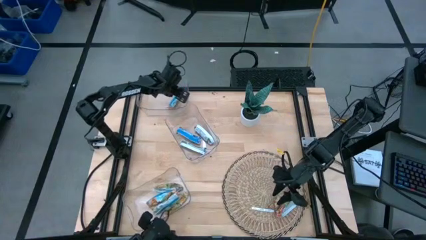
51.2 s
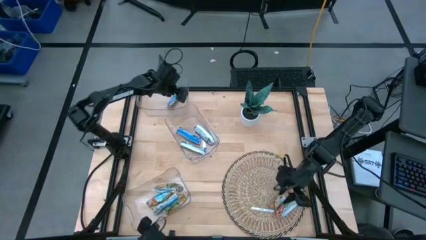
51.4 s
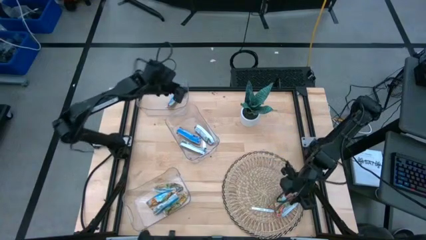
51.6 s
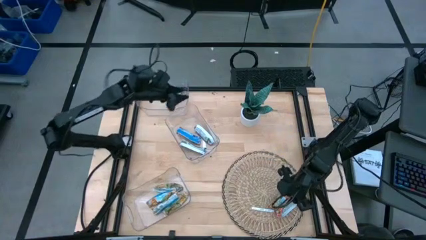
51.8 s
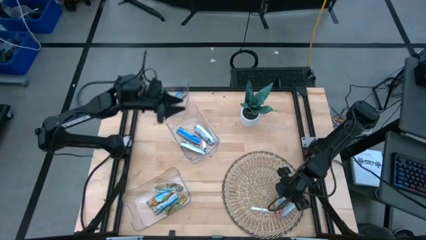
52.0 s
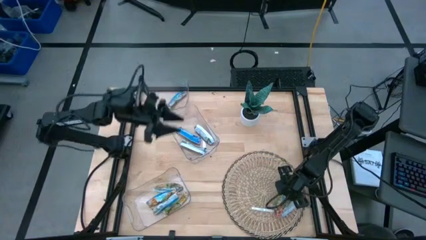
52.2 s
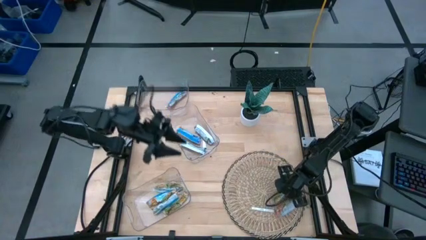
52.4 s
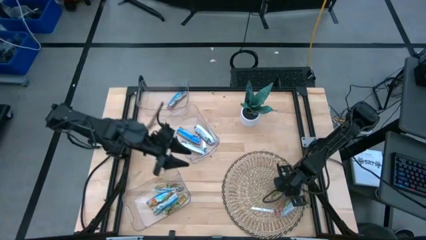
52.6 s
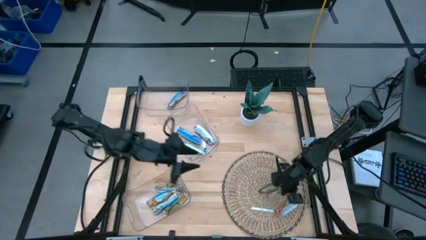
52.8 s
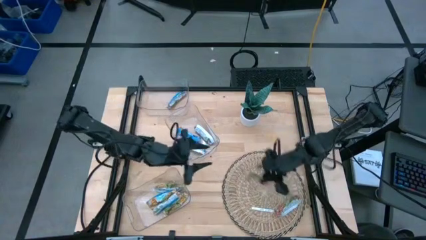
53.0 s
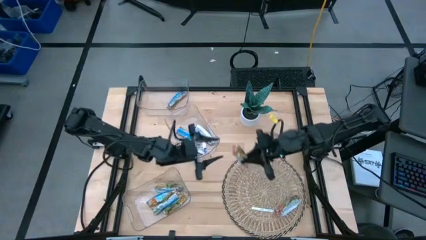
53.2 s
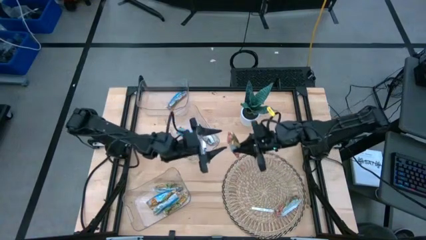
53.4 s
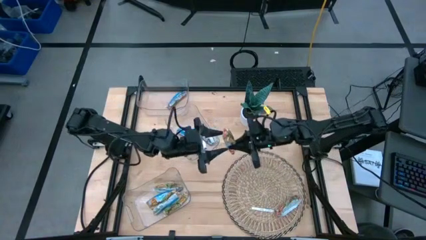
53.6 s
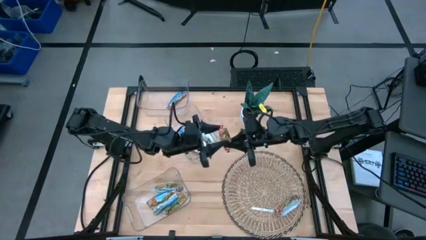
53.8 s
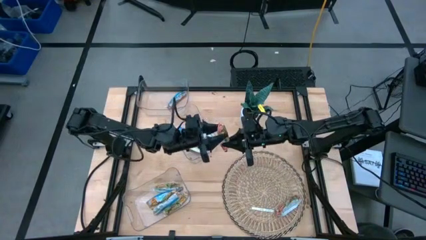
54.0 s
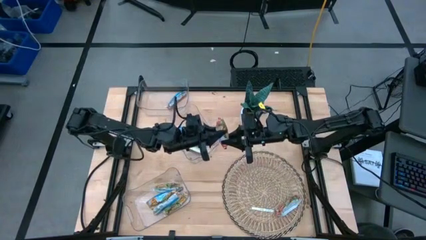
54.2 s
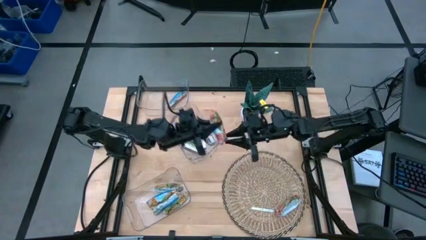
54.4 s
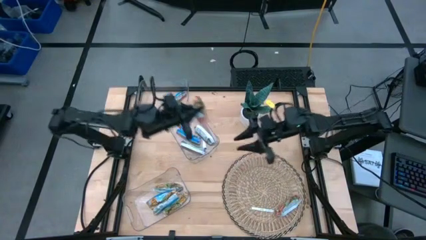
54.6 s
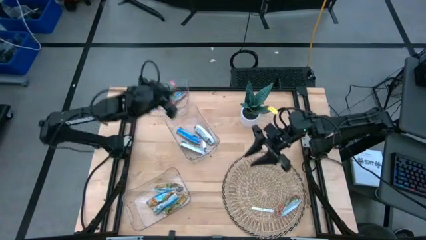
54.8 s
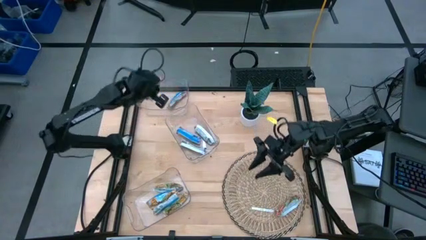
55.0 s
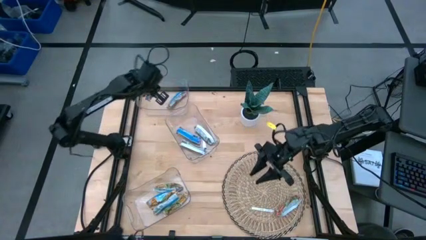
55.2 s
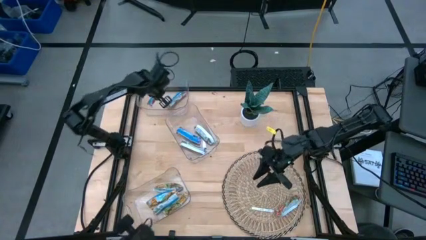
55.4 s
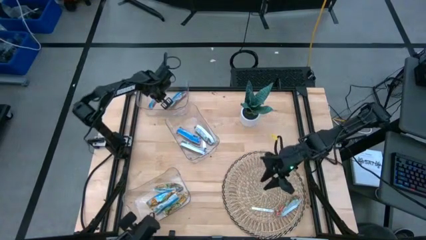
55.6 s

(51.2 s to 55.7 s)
Task: Pick and place Granola Bars by type
Put the red granola bar into the top transparent bin

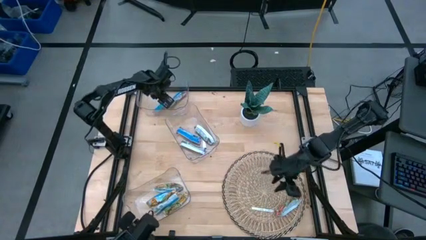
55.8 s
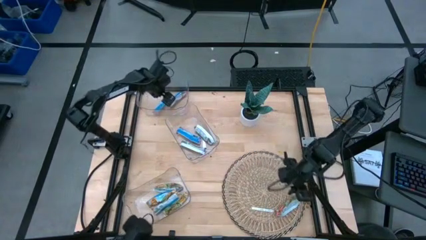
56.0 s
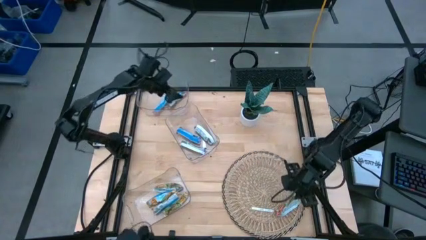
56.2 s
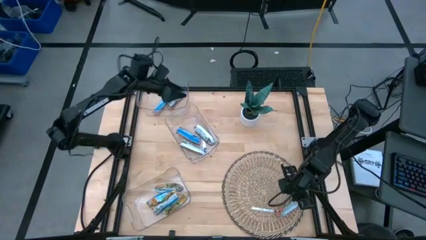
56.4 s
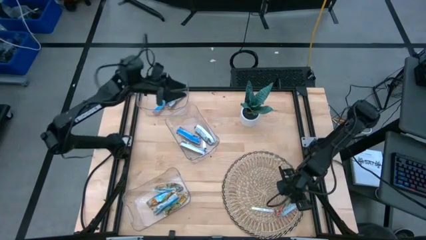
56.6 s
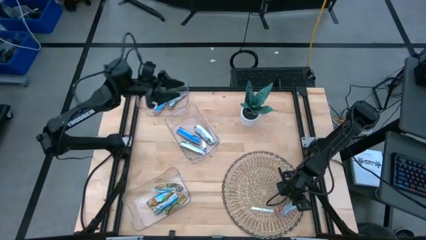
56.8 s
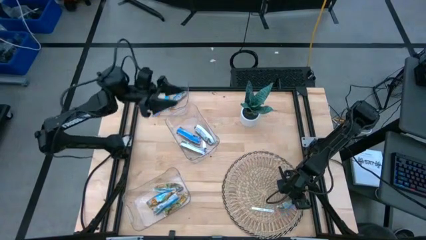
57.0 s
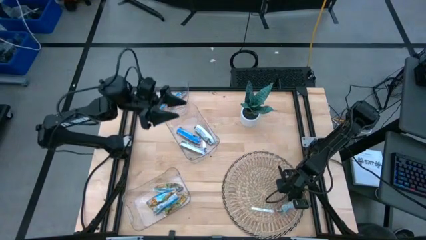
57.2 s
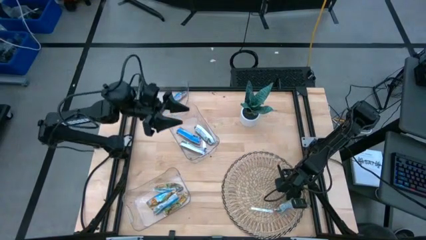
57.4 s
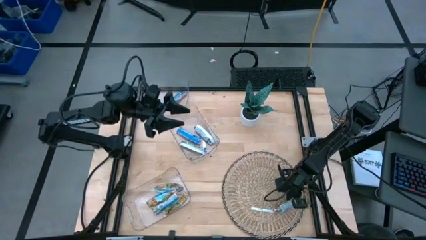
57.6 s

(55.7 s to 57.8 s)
Put the red granola bar into the top transparent bin

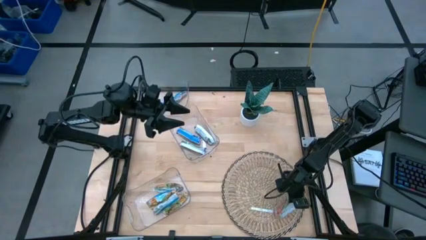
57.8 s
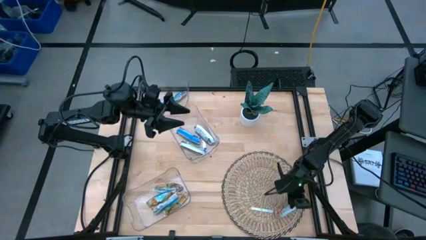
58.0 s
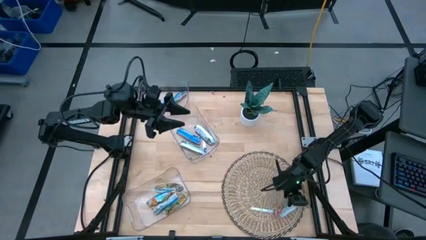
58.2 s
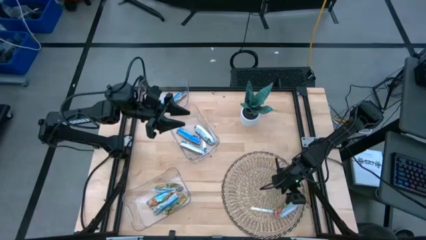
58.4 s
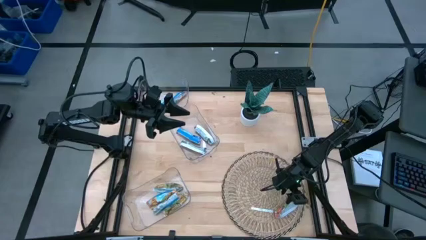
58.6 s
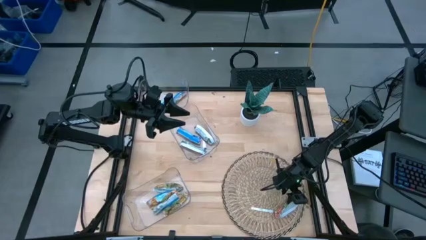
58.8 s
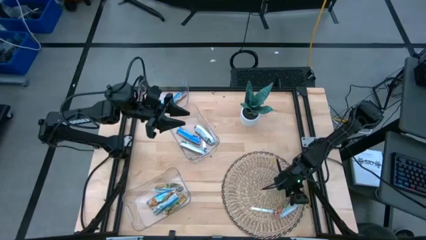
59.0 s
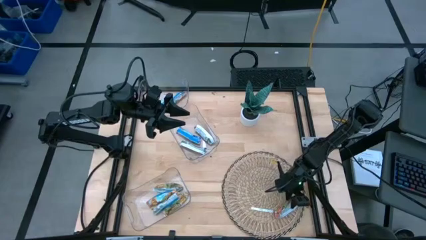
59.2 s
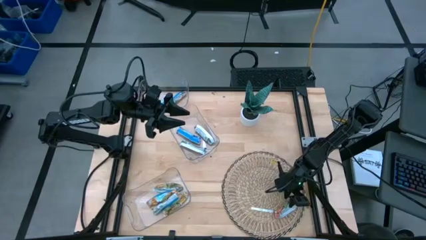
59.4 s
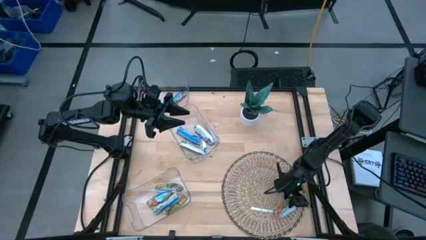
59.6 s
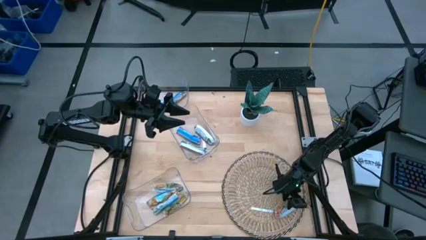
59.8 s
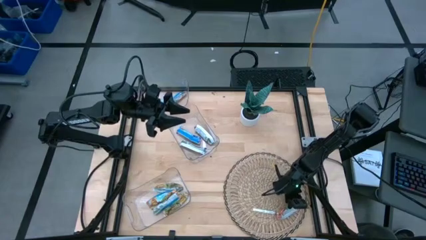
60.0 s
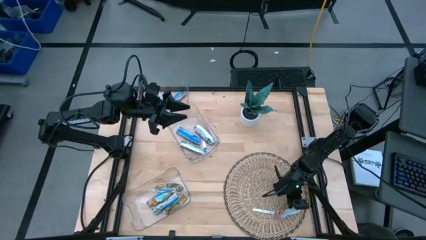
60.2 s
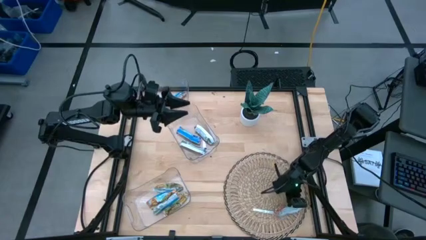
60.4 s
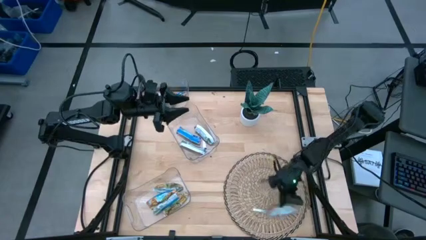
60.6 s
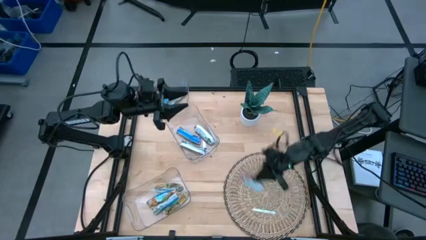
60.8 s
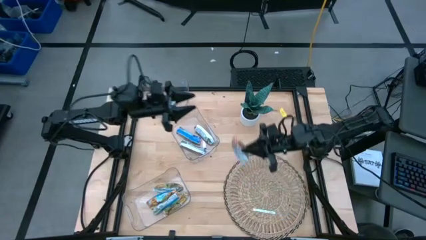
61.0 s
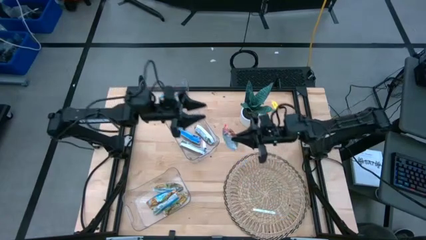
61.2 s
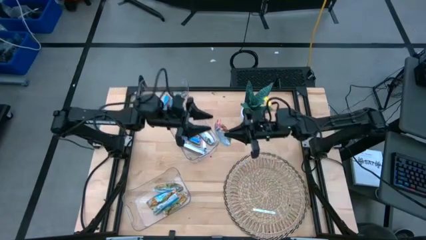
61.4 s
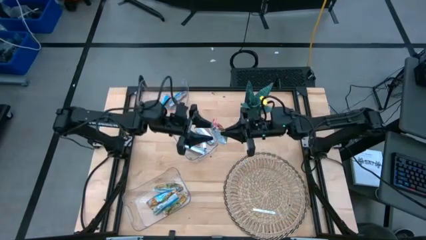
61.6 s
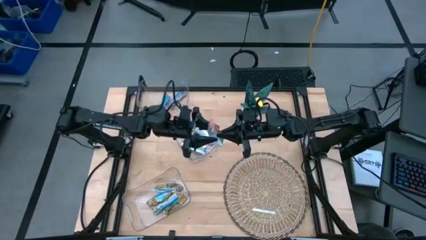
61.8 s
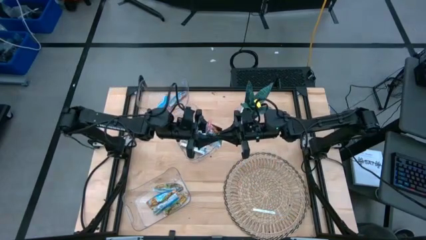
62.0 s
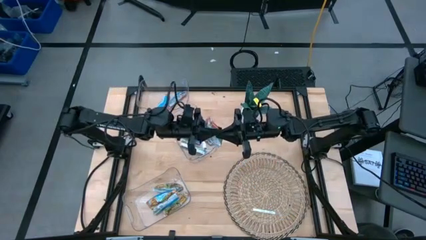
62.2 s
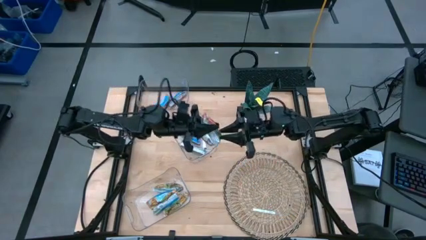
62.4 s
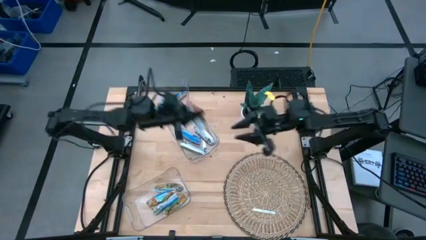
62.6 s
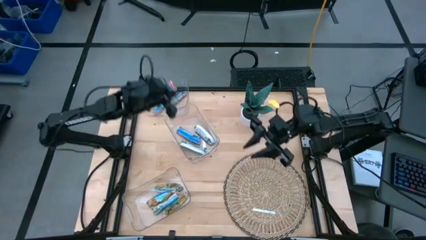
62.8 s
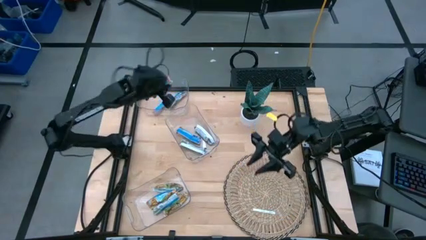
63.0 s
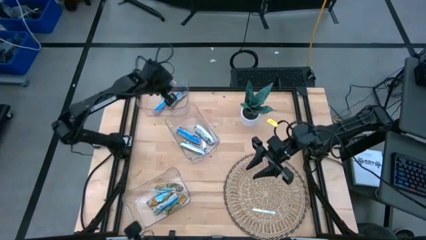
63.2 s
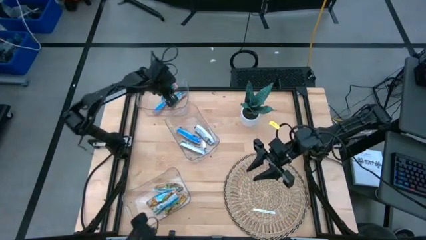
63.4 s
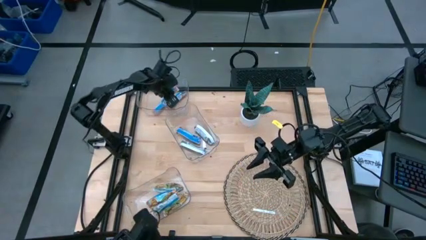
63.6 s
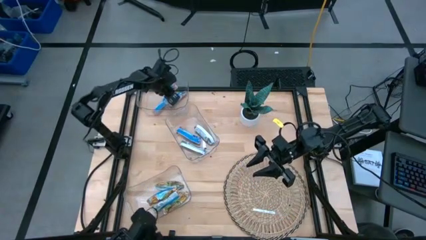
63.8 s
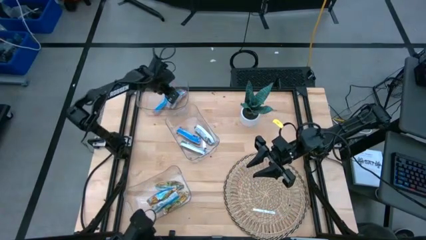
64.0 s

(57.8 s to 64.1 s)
Put the red granola bar into the top transparent bin

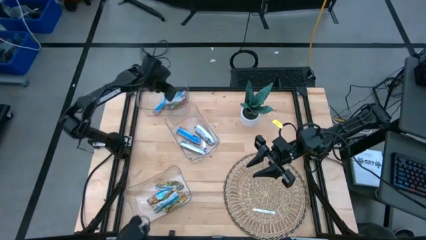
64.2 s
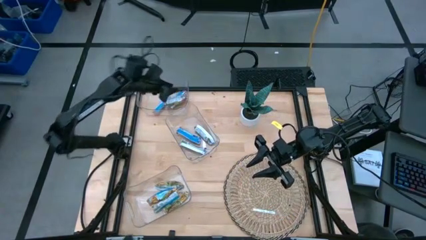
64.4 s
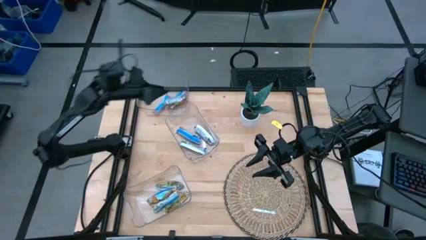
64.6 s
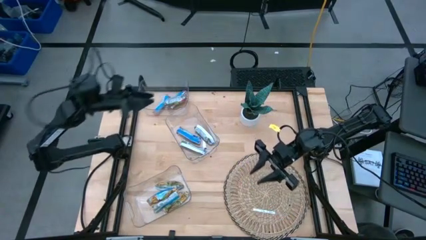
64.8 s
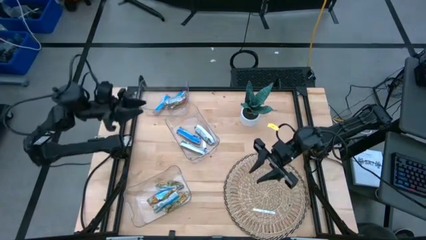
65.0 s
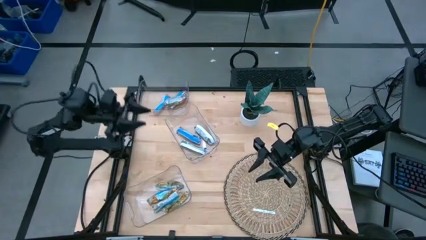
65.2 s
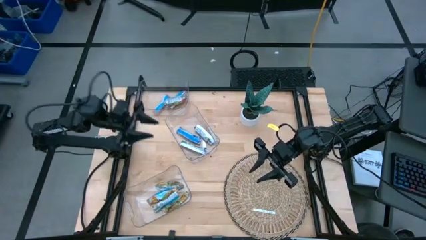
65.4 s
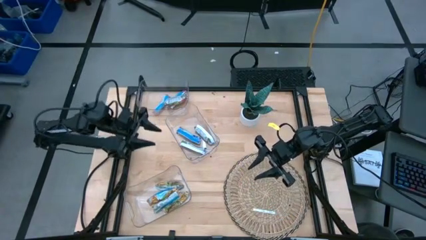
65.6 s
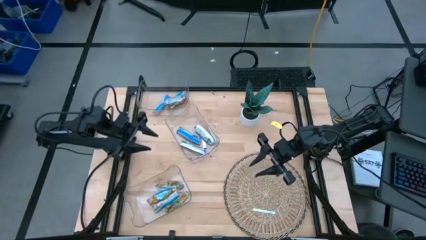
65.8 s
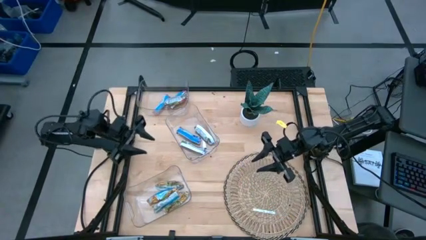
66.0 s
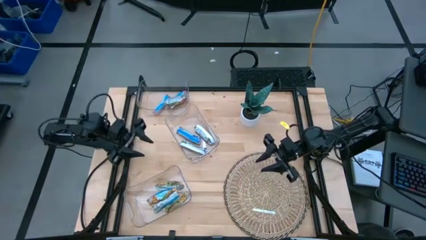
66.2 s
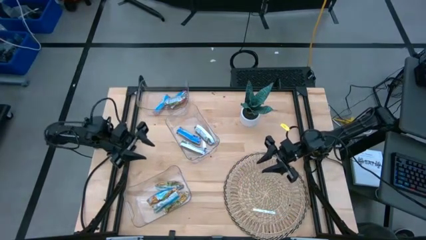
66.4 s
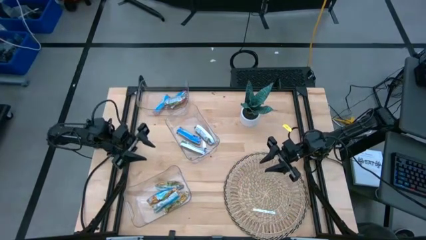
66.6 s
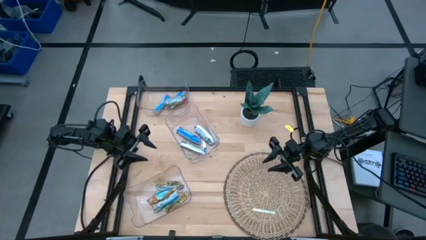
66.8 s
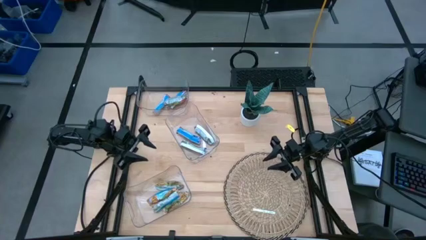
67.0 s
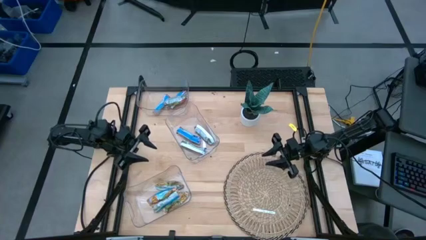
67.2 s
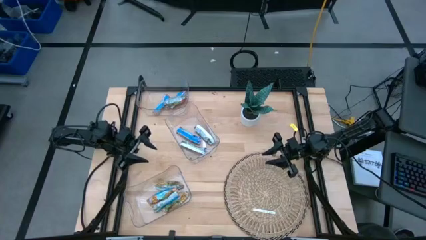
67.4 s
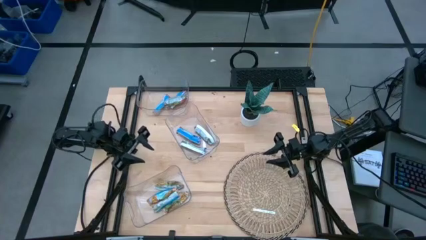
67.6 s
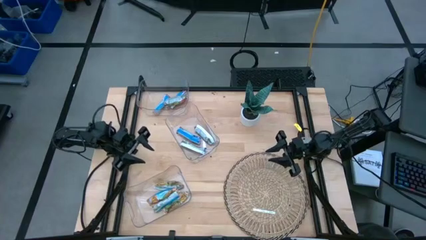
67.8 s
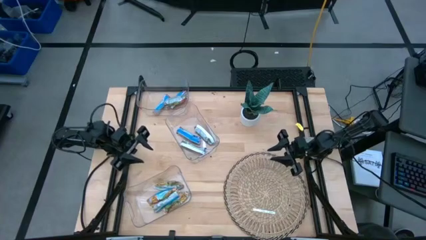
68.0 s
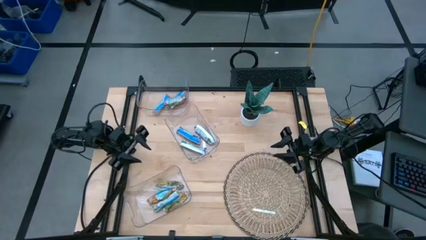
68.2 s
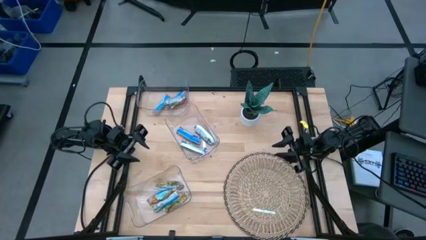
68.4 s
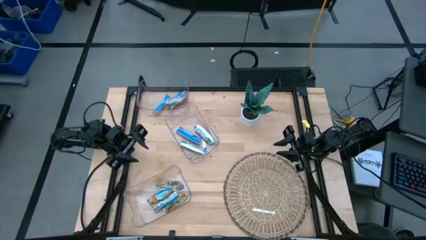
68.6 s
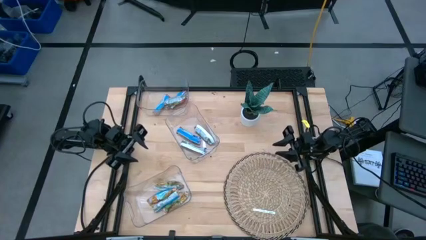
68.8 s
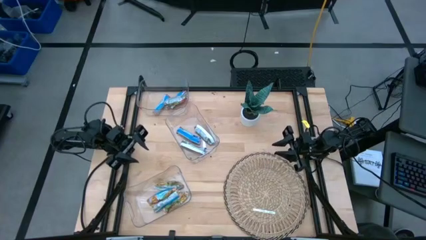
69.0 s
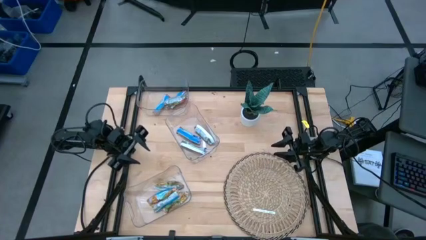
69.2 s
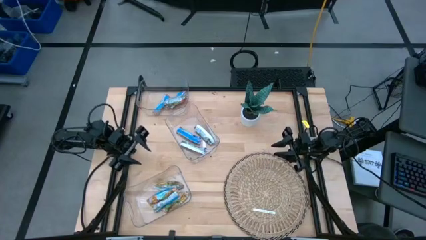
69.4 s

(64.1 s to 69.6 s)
Return to Home Position
